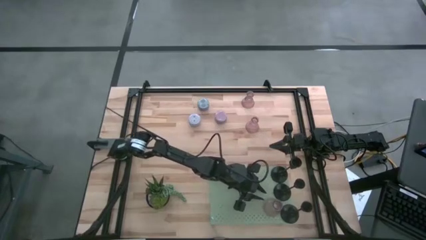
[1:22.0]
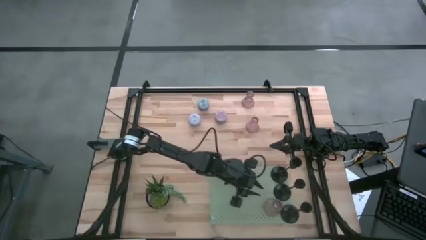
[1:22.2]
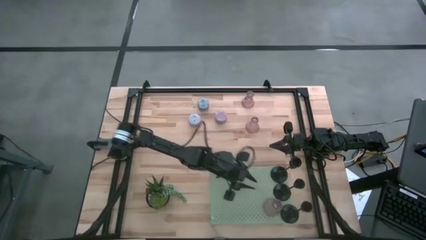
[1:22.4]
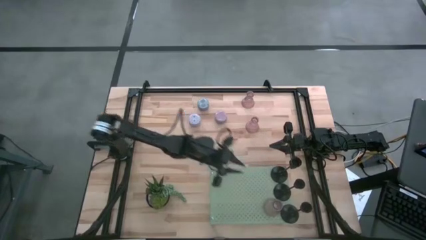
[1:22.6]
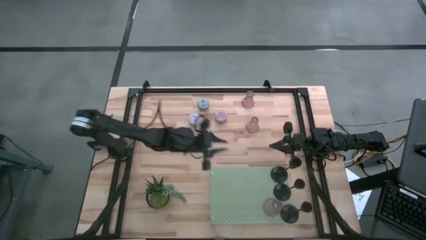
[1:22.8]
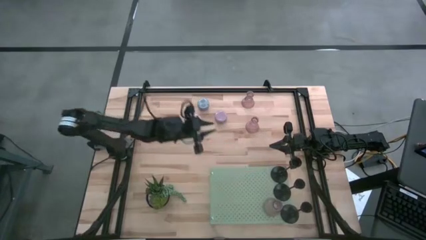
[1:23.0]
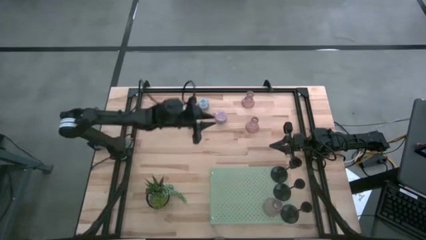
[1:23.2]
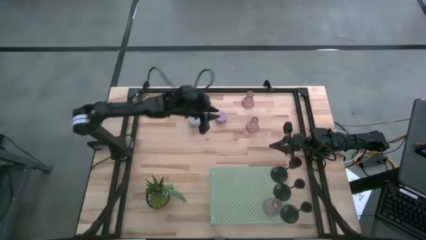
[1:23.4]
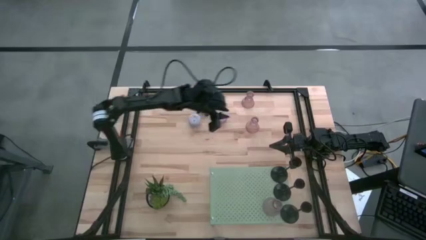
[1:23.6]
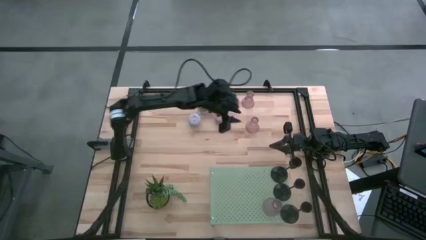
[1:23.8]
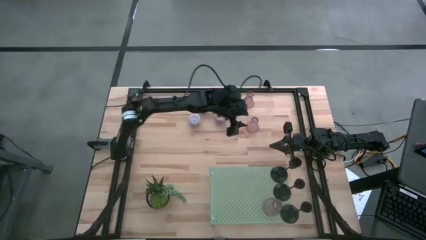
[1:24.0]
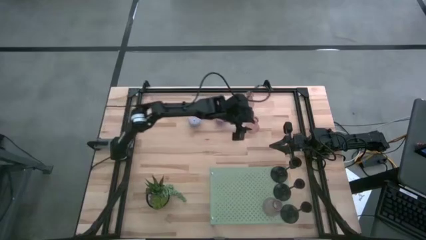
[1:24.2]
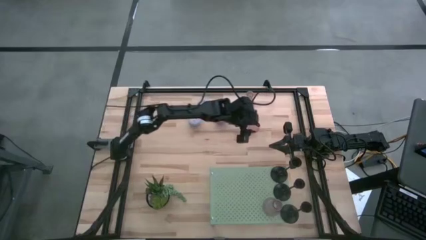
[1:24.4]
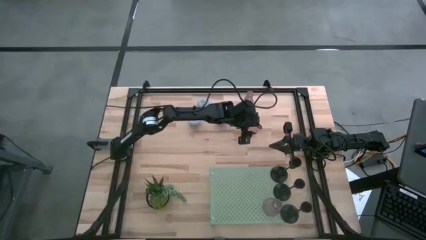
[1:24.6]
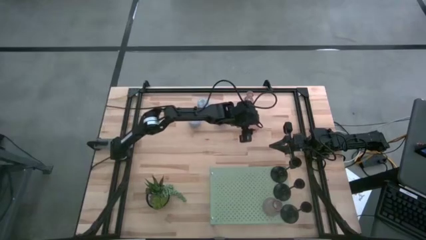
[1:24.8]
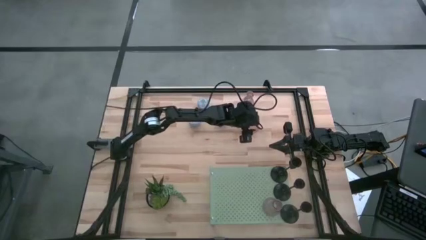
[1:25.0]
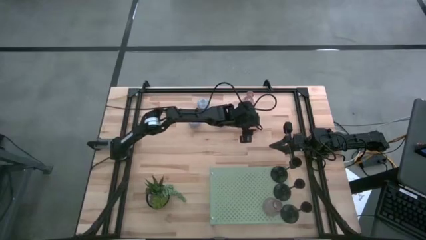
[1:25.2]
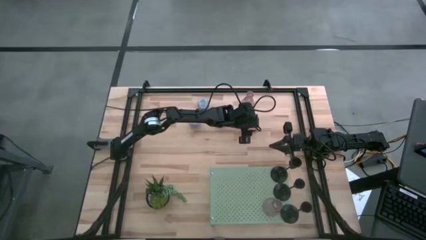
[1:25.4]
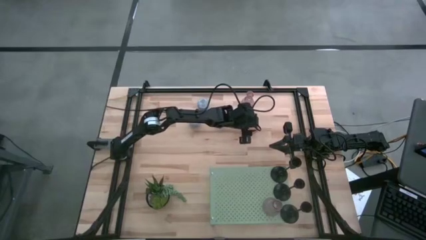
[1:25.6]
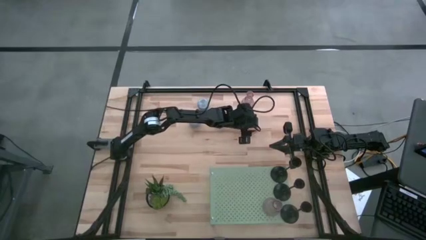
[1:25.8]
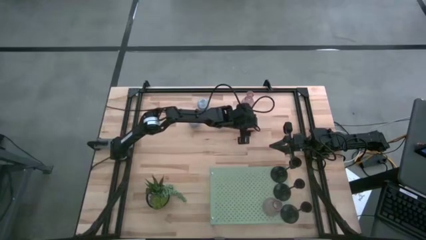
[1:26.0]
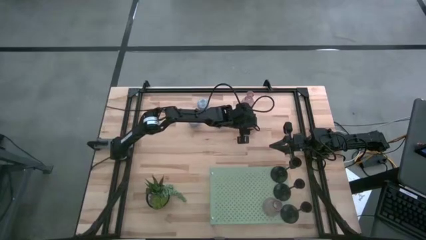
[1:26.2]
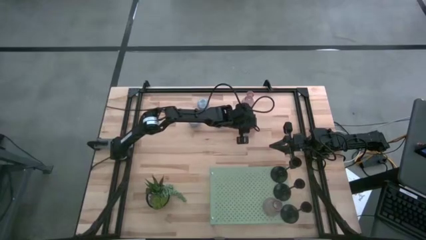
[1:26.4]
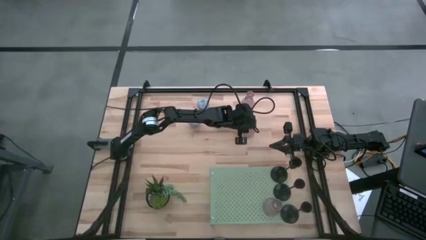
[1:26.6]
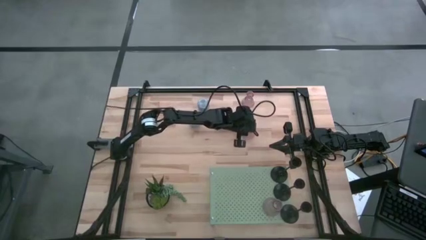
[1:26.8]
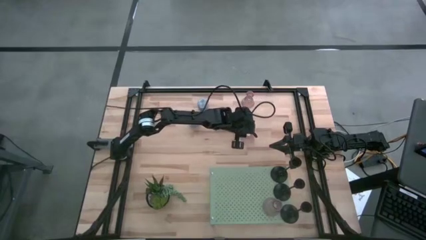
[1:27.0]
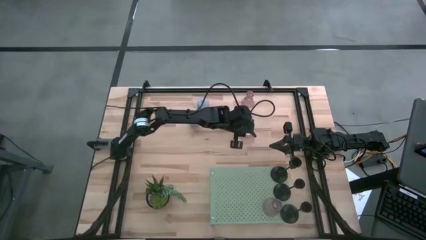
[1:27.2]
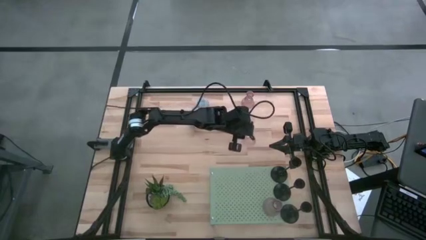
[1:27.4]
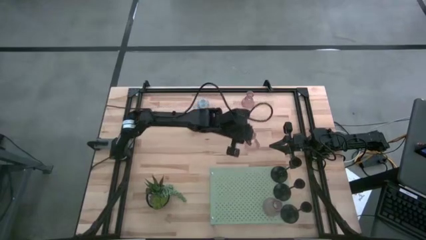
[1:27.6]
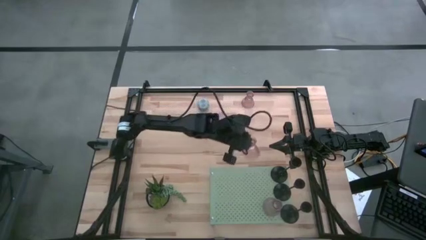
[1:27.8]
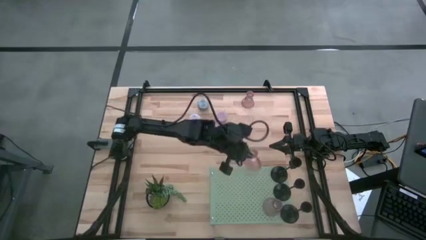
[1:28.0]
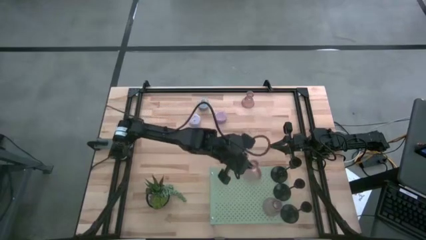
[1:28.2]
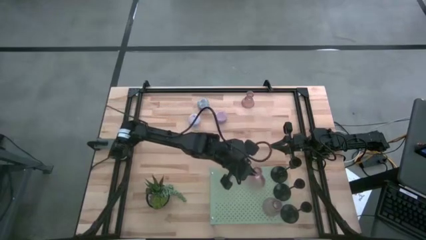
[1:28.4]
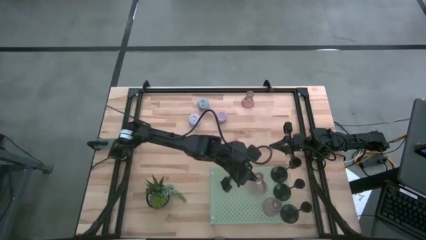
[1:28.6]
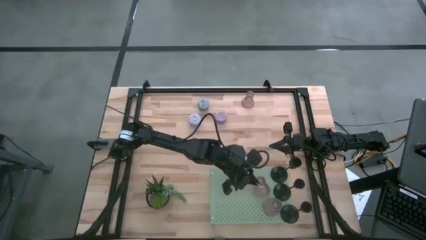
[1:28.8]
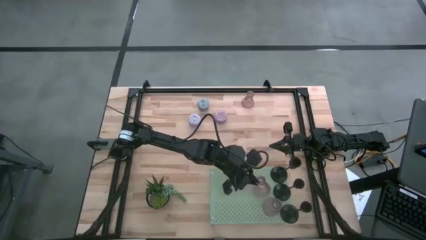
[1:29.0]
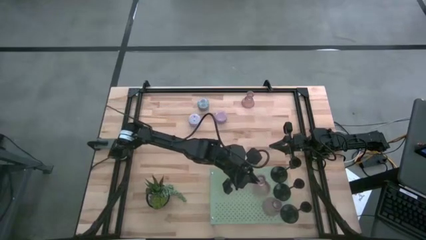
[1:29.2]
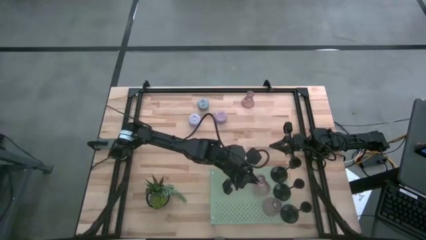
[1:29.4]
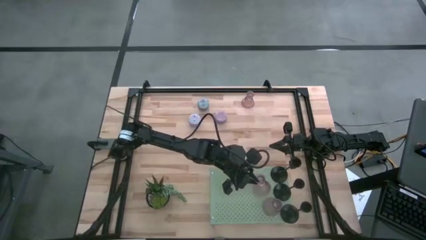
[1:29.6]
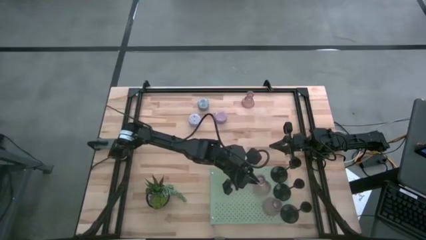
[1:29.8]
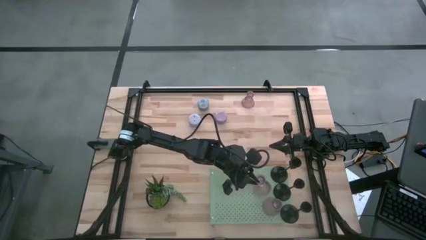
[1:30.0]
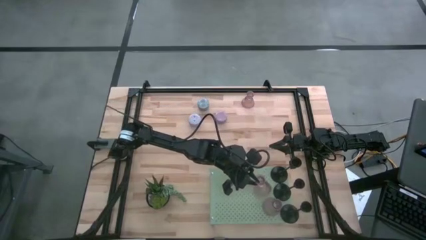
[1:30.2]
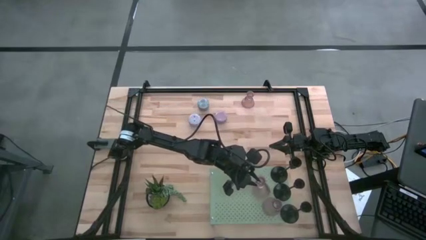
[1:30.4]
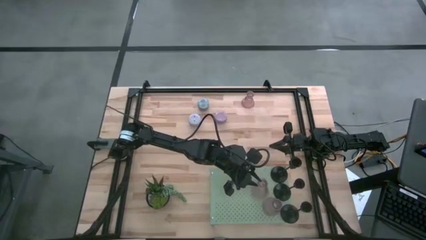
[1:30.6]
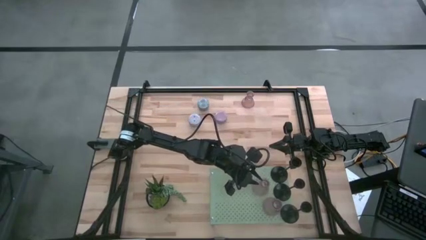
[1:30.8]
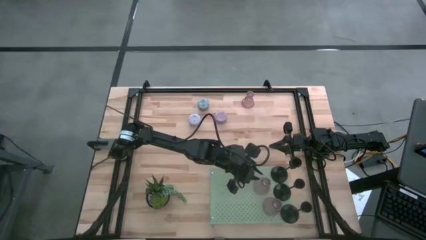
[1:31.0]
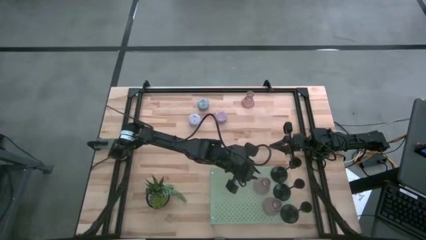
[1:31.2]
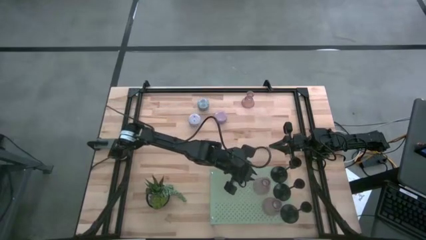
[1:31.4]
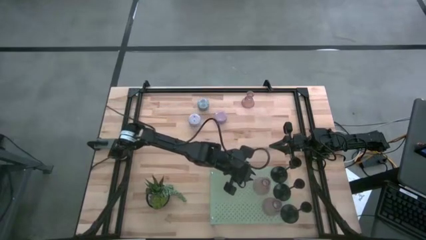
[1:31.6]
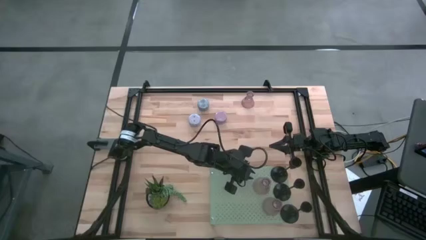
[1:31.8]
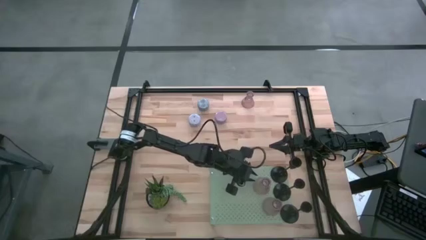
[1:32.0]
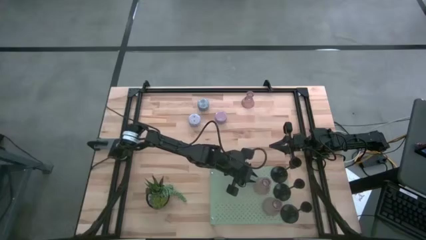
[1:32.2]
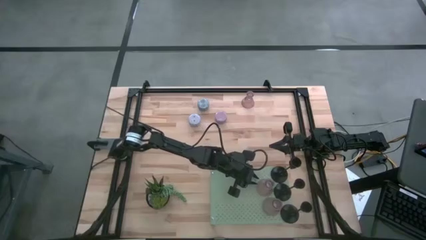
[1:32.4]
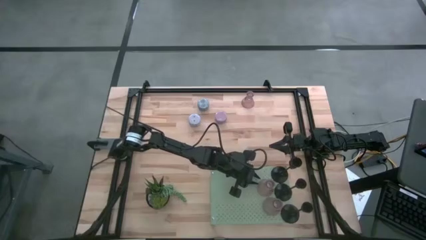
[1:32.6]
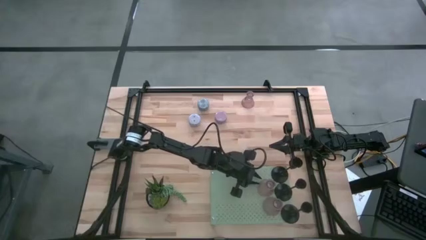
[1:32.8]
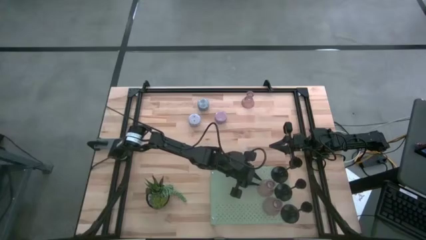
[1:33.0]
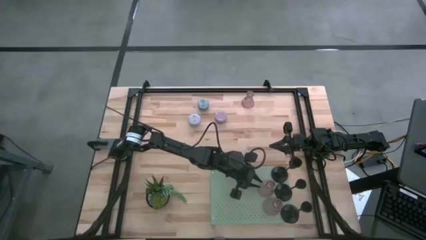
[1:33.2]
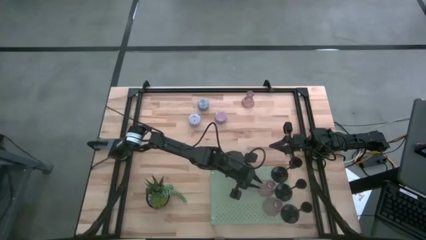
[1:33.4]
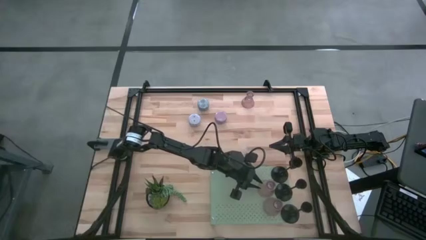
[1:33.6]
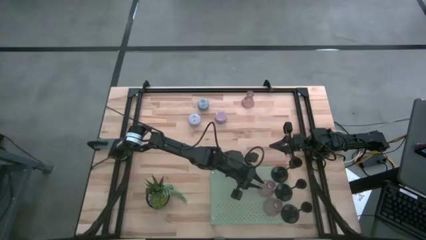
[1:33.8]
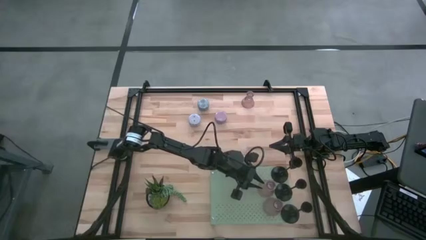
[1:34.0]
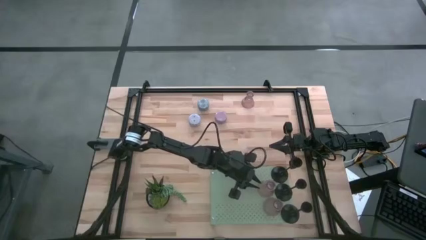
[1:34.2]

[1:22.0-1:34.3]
Task: Pick & Place candle stick holders
Put the bottom pink glass candle holder on the shelf aligned with the other pink glass candle holder

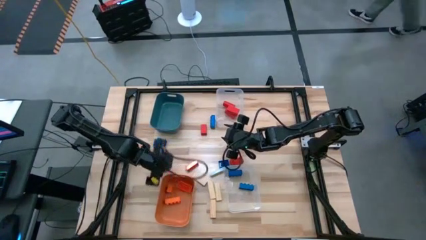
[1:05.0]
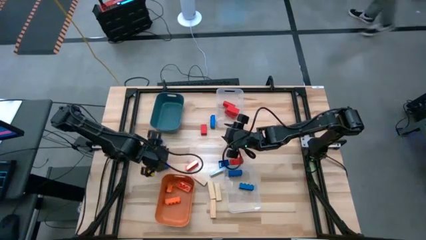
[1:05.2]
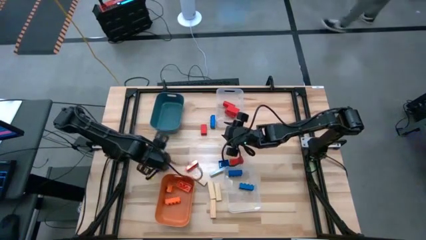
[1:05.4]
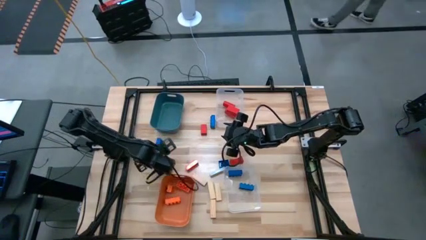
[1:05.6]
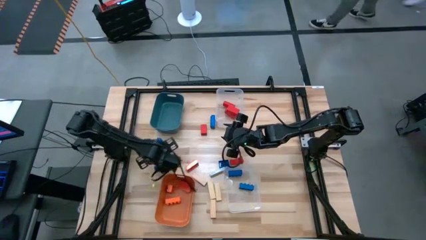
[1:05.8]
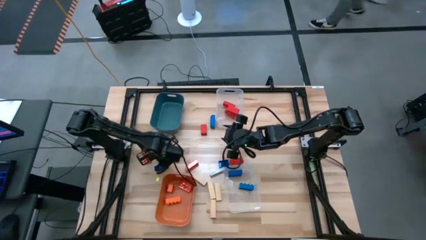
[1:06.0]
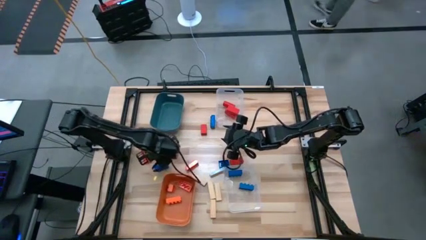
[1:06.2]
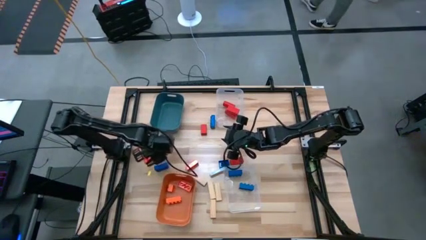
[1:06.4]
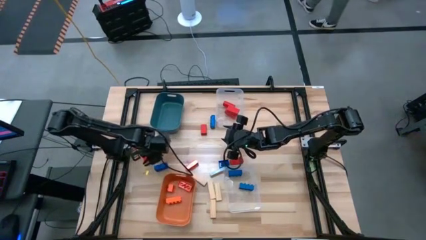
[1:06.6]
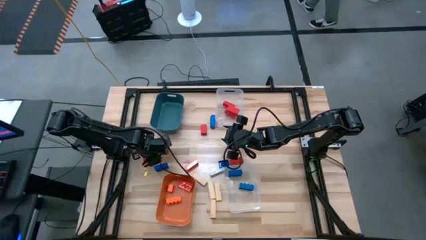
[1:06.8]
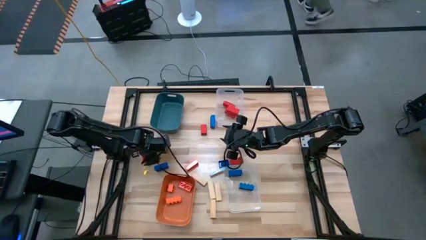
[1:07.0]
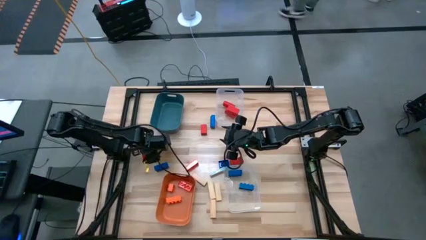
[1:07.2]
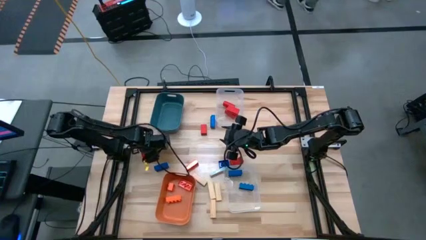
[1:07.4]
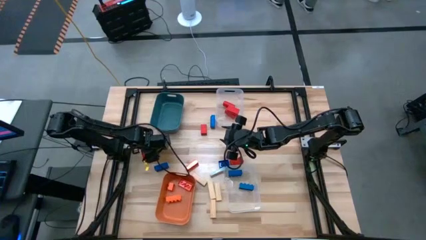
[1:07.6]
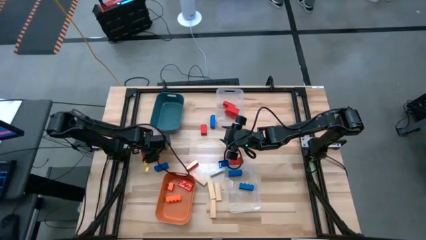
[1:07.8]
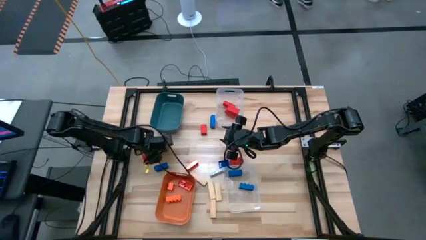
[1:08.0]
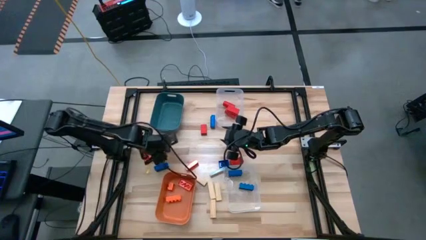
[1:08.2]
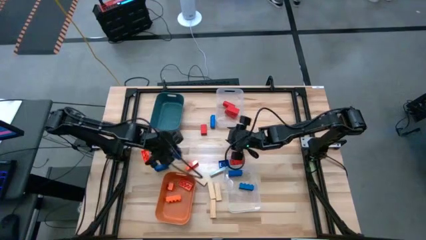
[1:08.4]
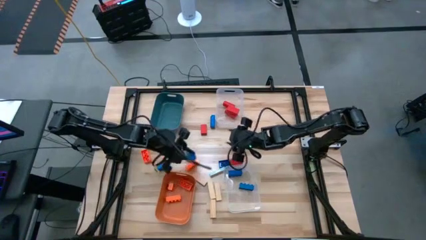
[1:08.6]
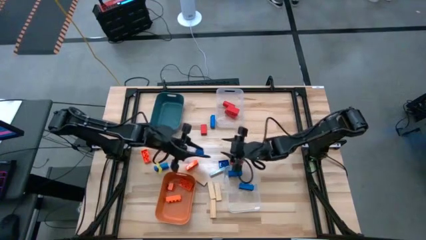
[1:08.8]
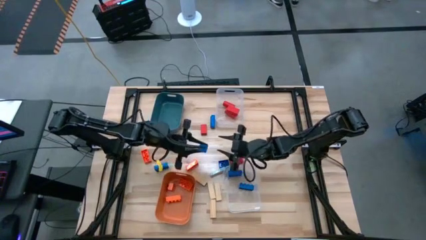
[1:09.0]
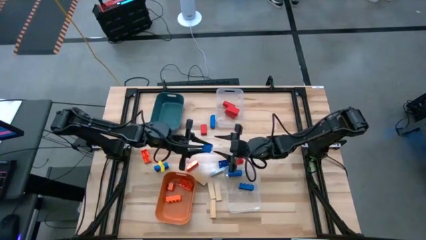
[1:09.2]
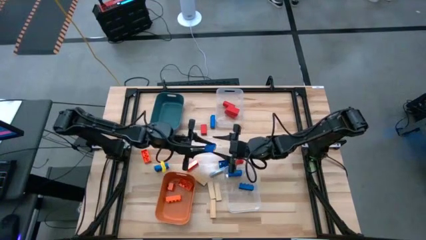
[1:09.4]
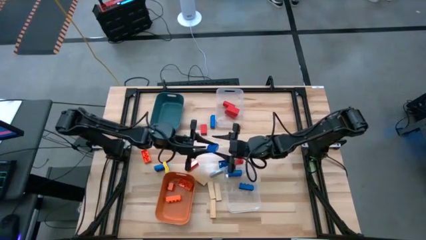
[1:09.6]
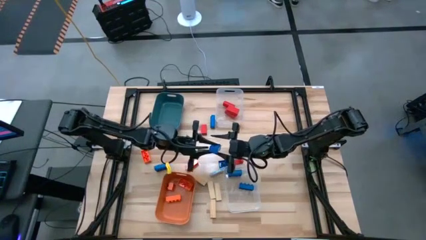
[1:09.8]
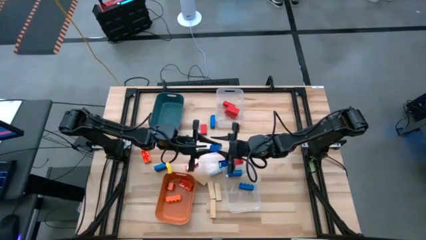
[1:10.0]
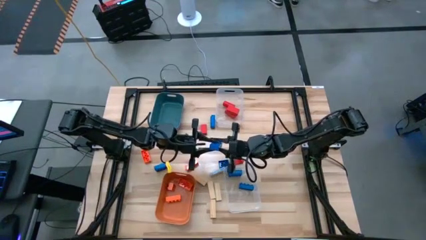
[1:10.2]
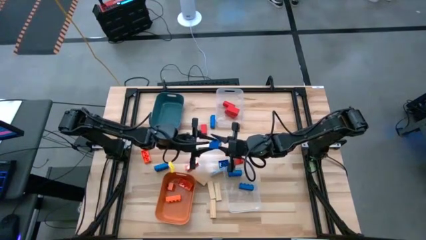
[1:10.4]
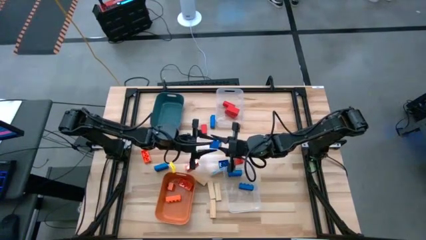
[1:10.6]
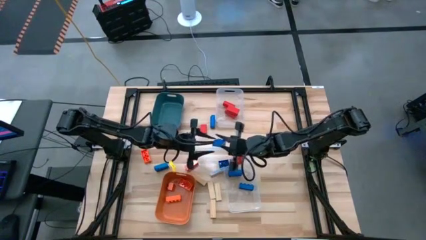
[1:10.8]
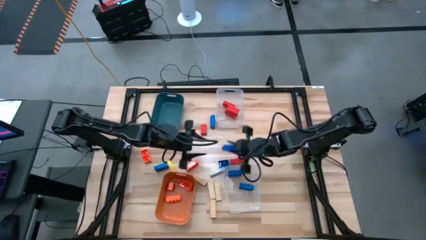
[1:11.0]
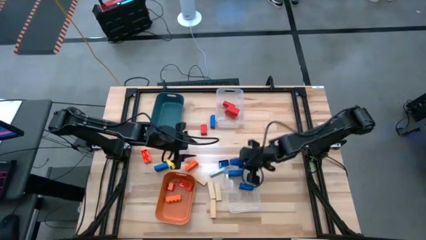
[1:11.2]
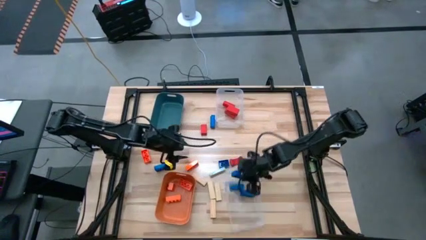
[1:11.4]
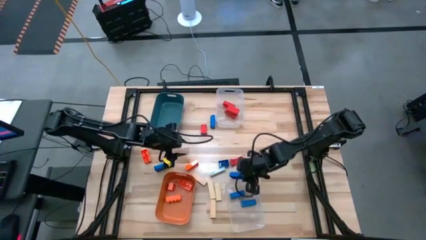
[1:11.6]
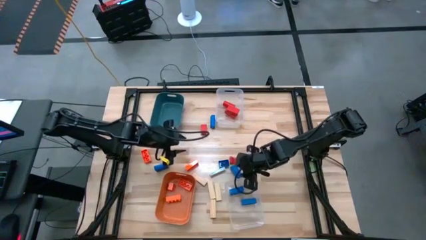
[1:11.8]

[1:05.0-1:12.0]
Task: Sort blocks
Put the blue game piece into the bottom transparent bin
